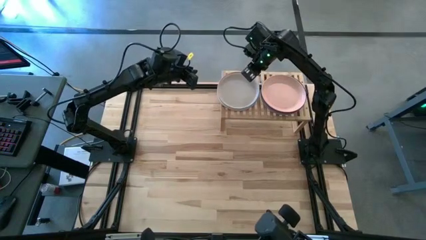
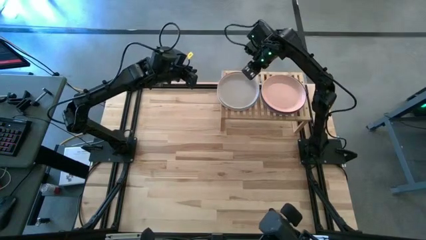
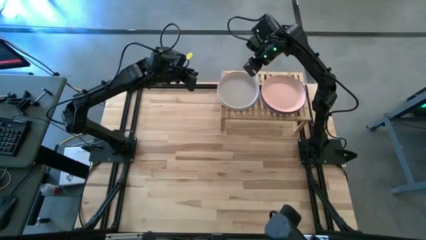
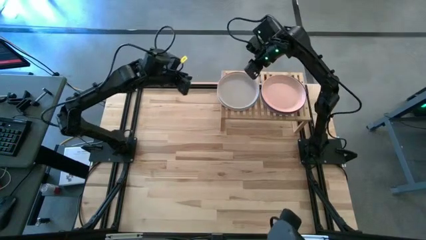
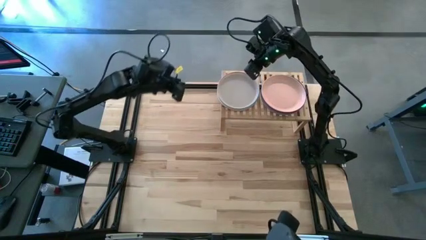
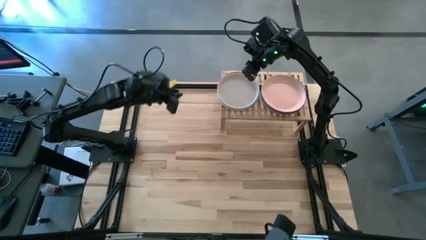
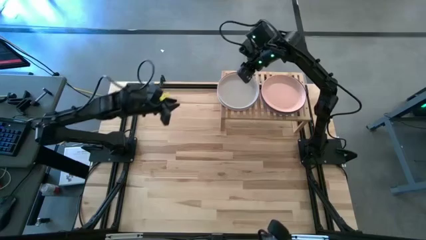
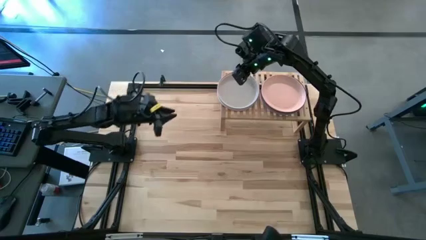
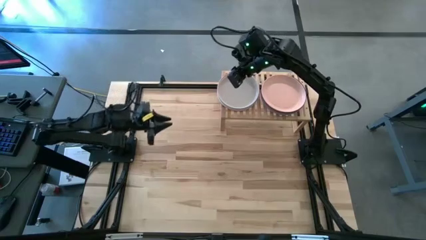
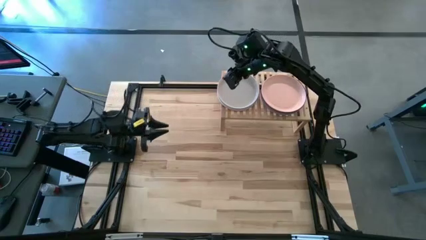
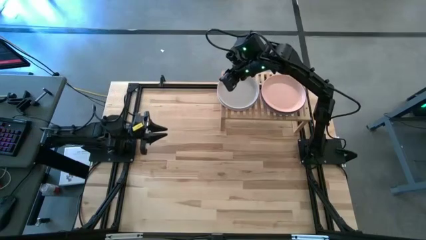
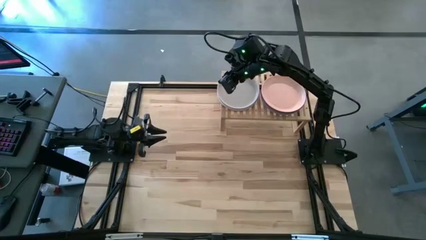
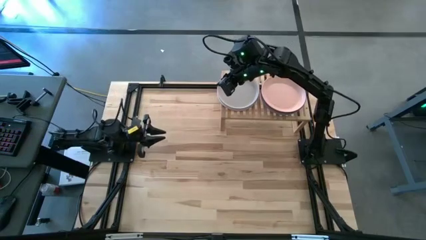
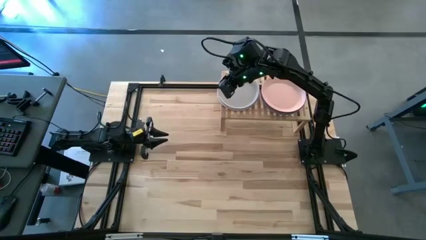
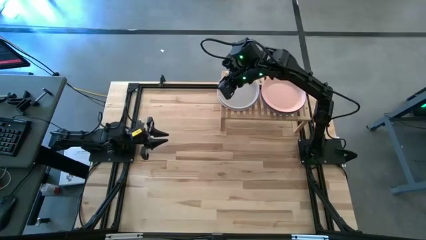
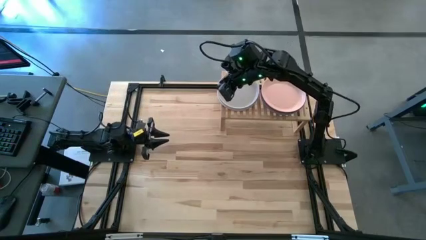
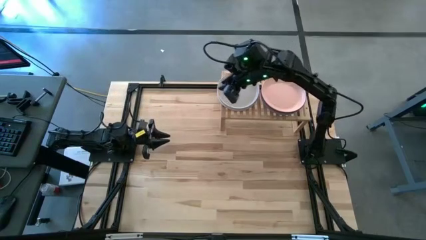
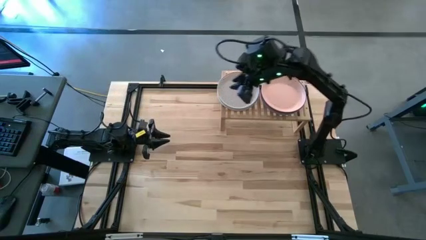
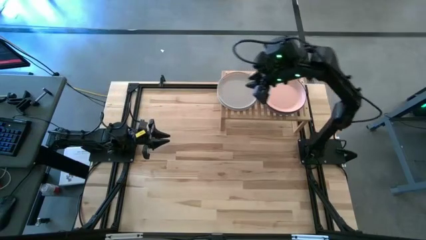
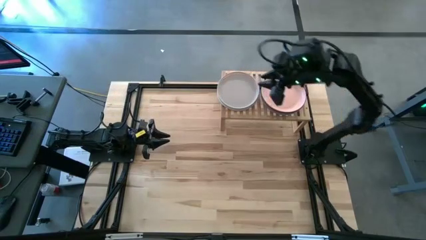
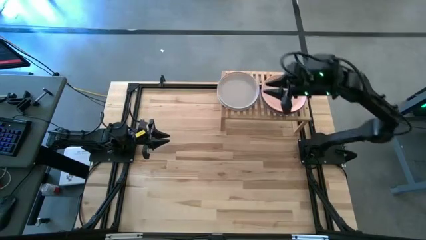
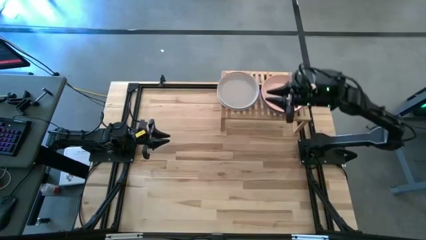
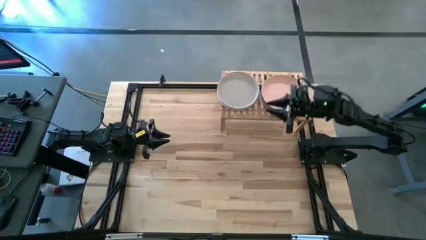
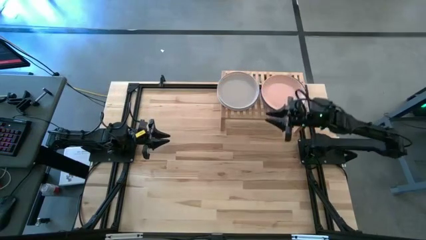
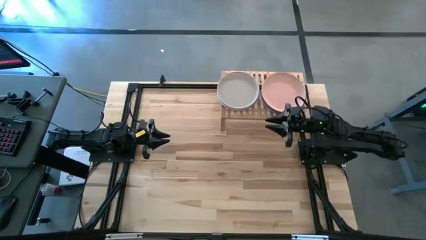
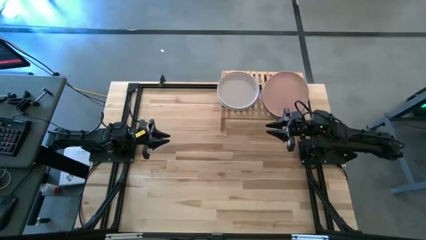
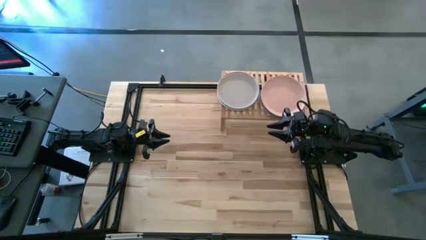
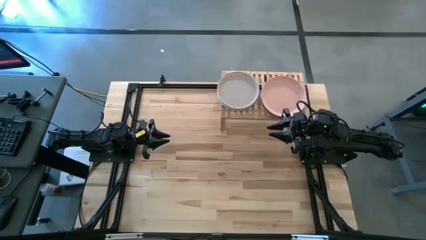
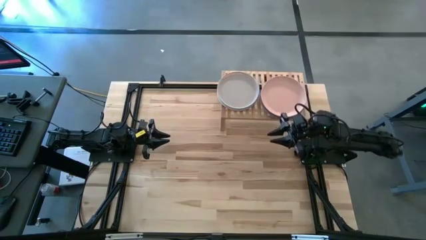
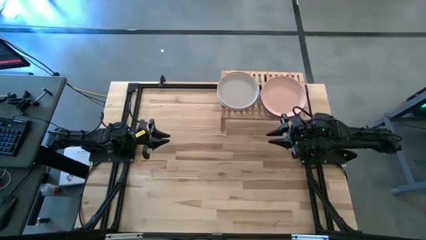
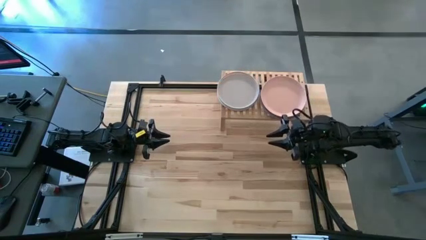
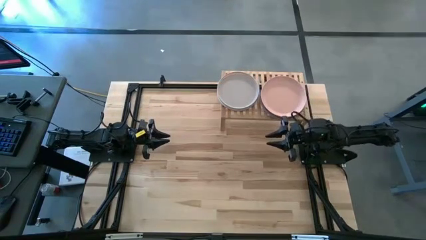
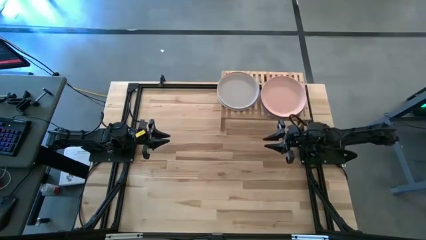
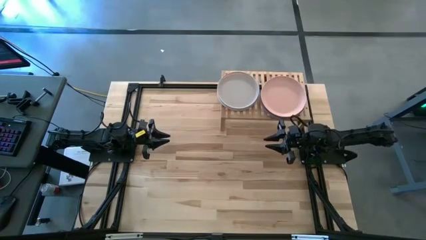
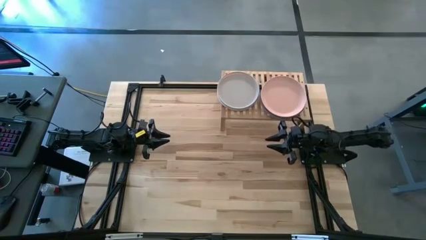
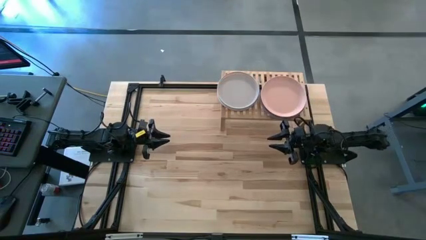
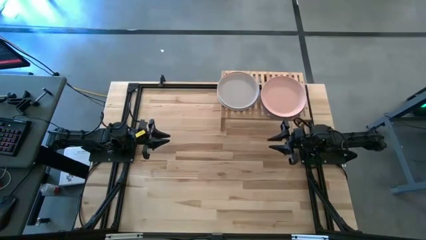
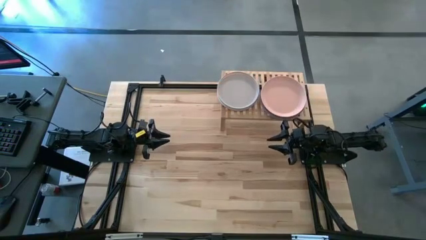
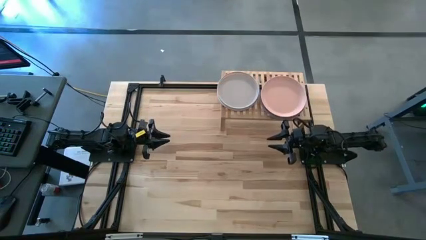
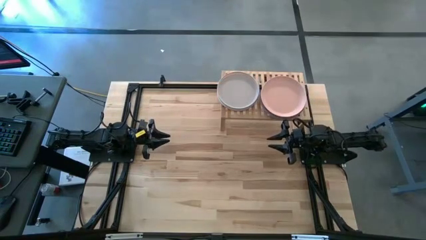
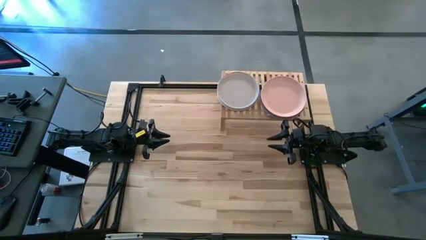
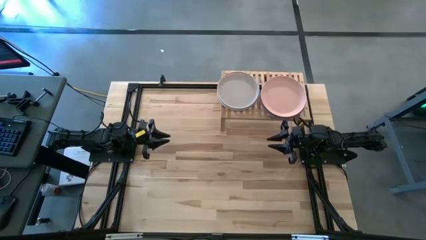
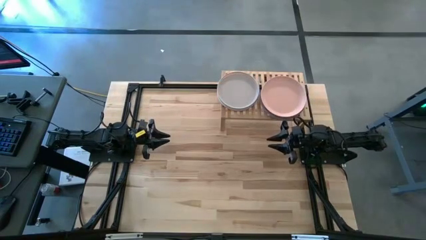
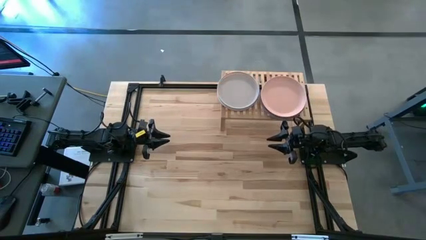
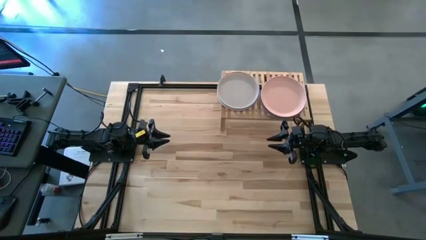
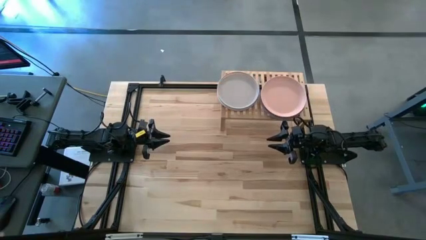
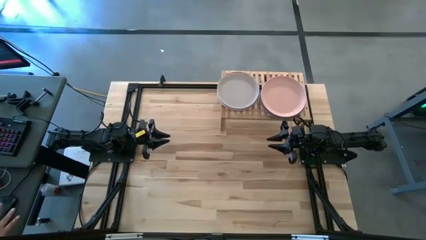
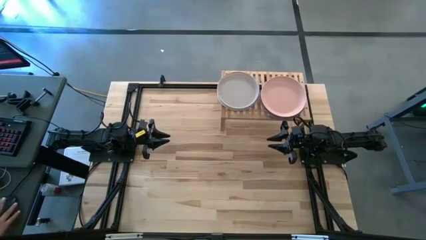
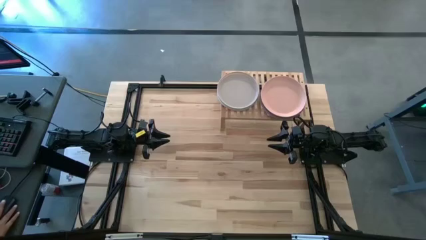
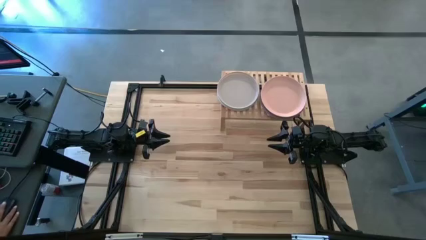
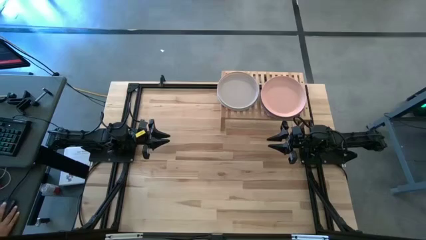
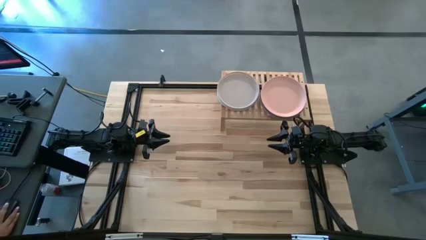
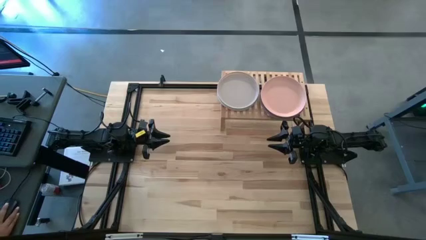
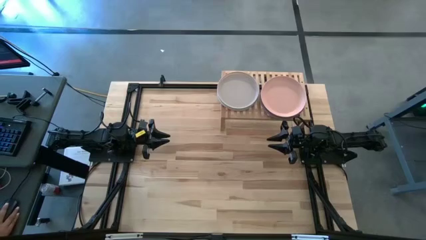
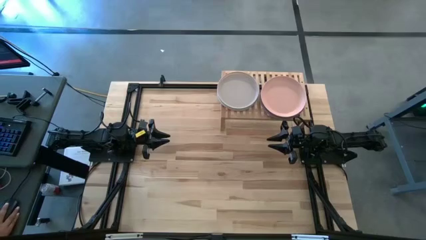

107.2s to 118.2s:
Task: Place and stack plates onto a shelf
Return to Home Position

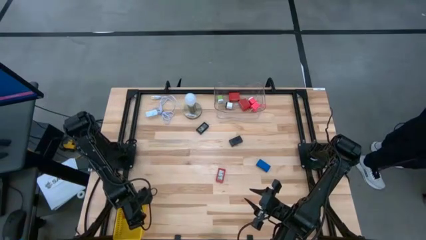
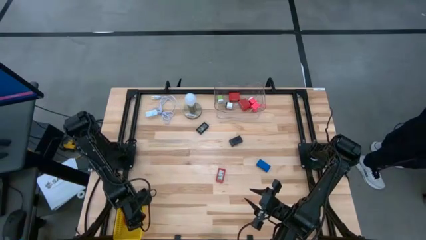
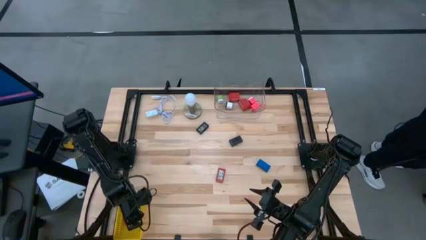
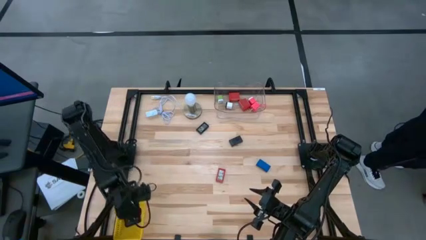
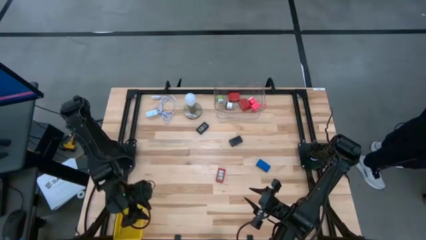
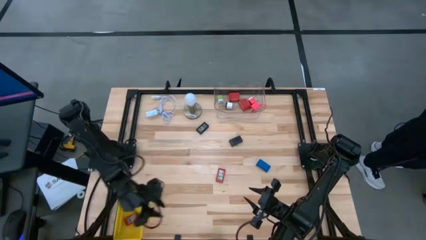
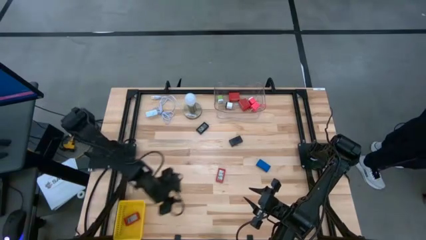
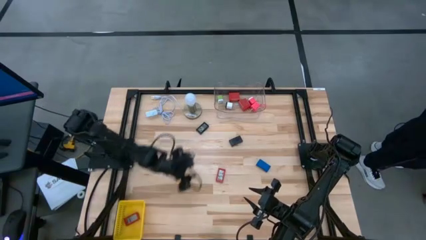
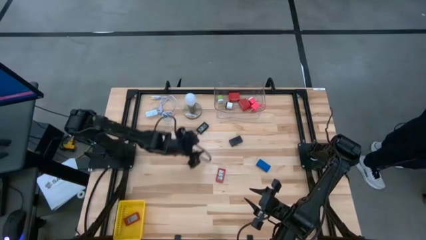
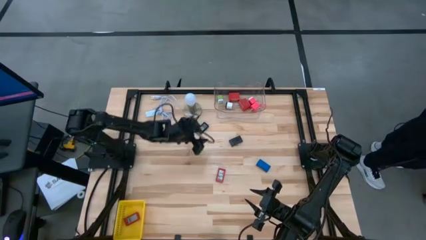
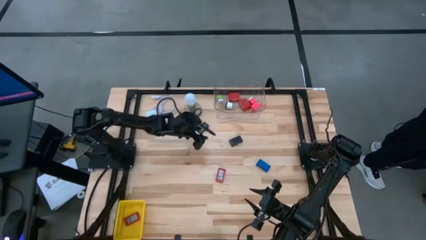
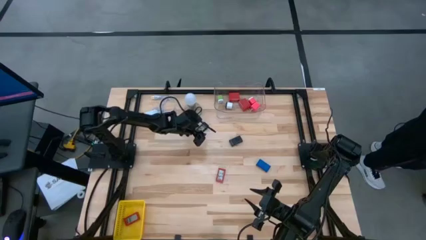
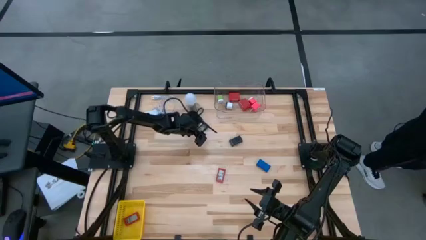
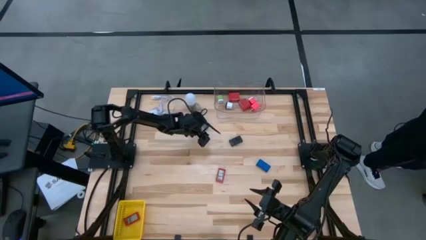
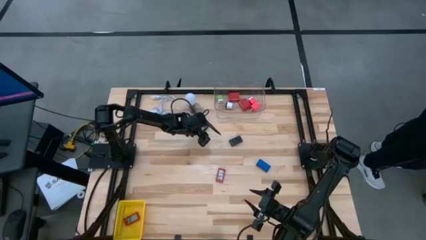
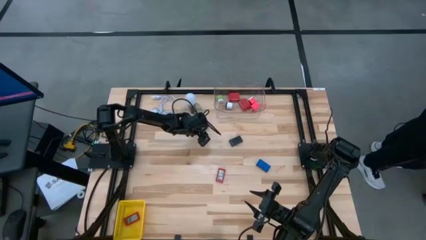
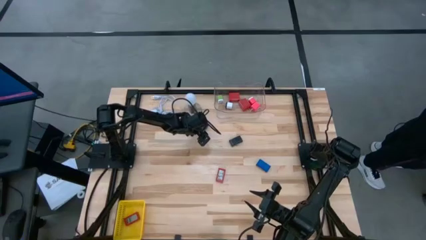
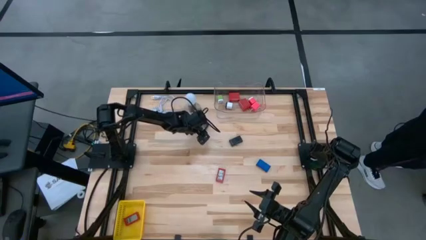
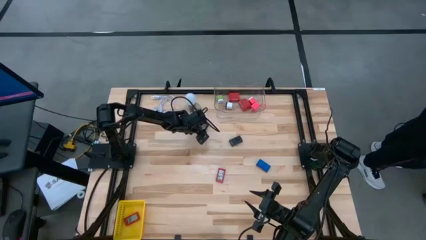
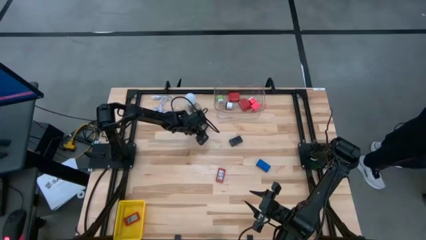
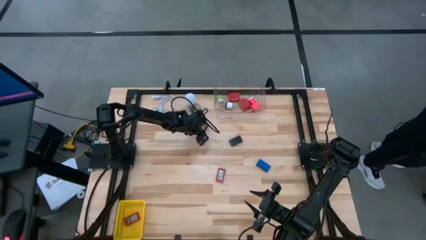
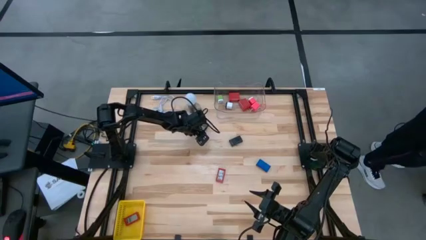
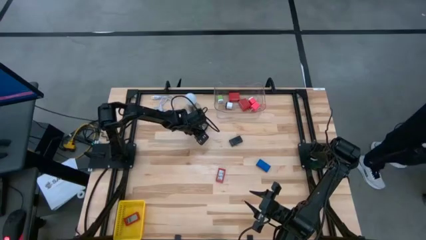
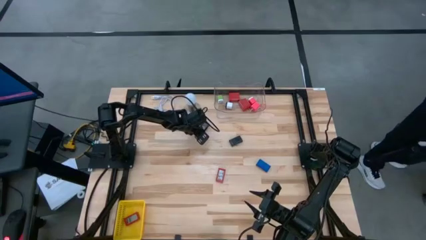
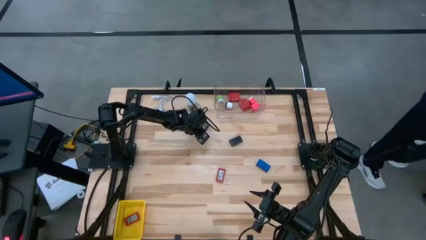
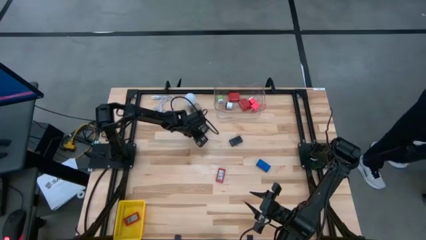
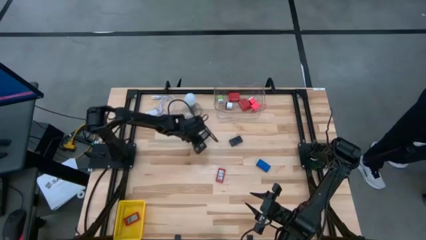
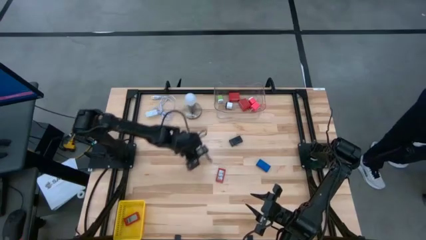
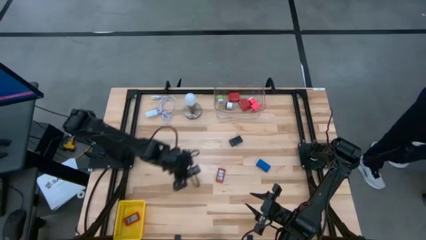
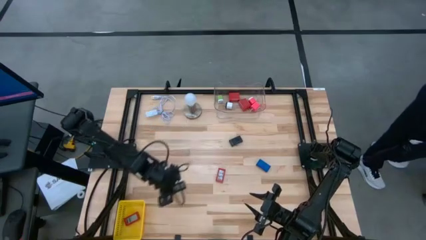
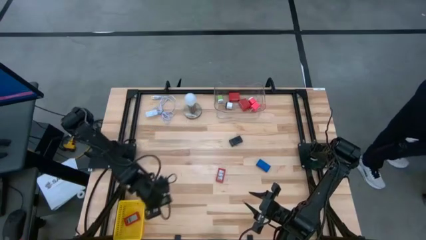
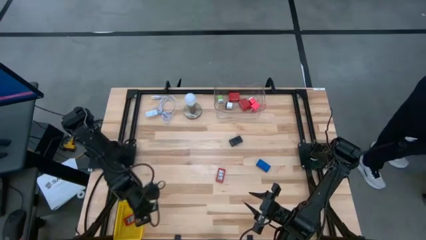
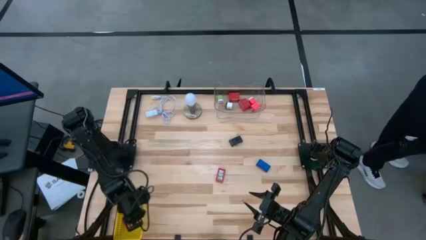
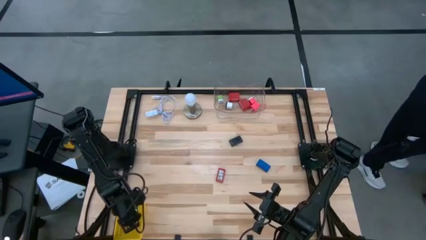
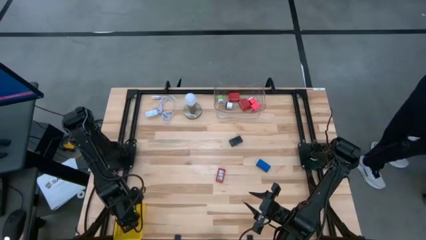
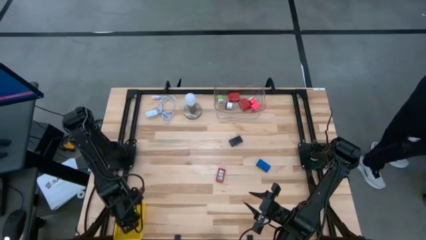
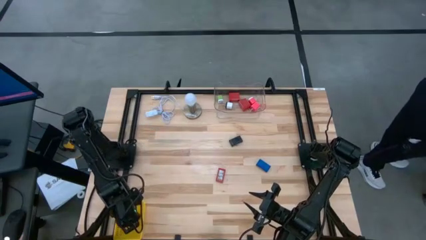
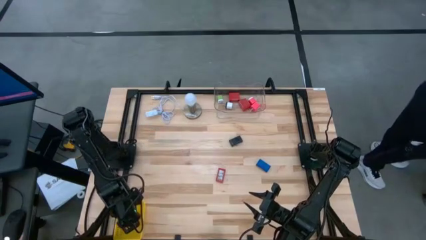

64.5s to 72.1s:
Task: Pick & Place Office items
Put the left black digital clock into the yellow basket
